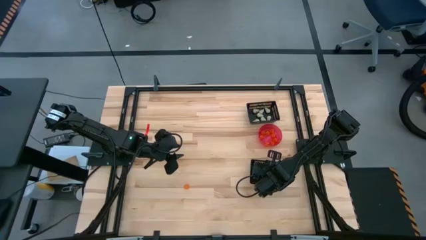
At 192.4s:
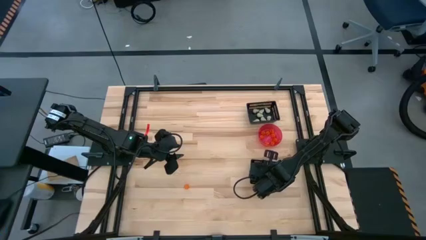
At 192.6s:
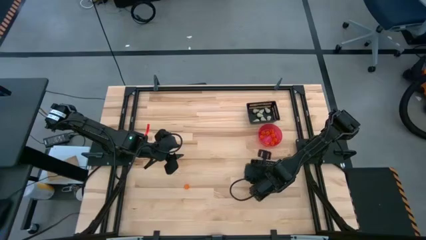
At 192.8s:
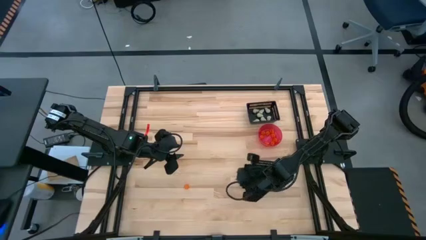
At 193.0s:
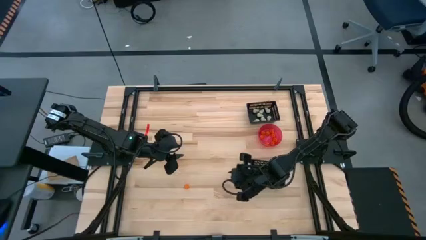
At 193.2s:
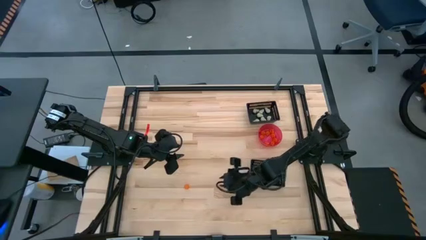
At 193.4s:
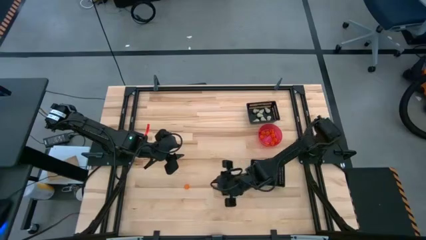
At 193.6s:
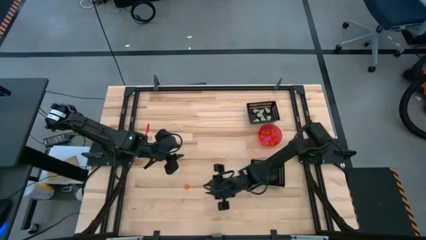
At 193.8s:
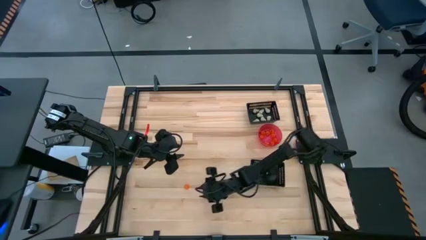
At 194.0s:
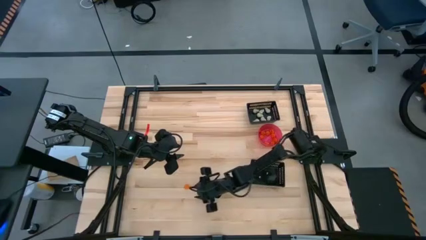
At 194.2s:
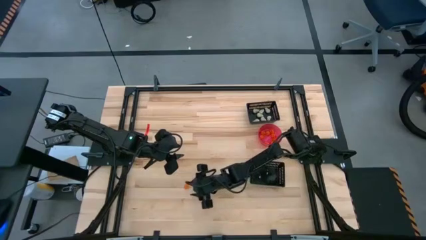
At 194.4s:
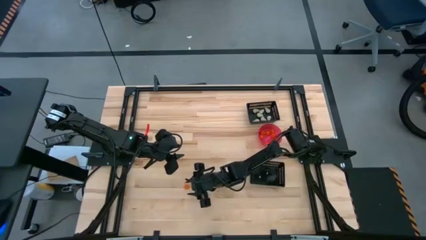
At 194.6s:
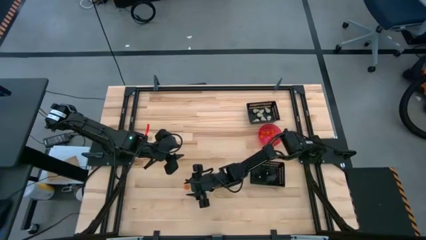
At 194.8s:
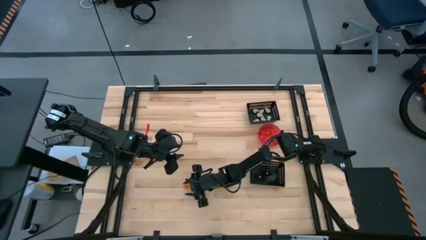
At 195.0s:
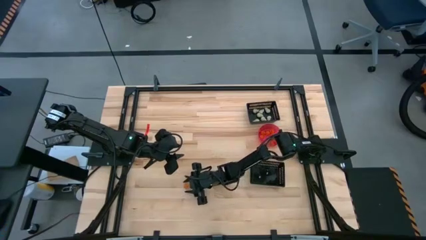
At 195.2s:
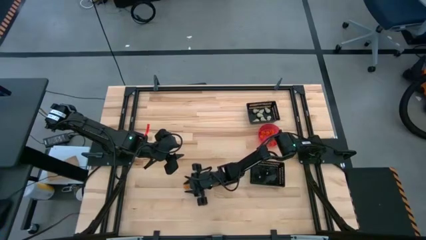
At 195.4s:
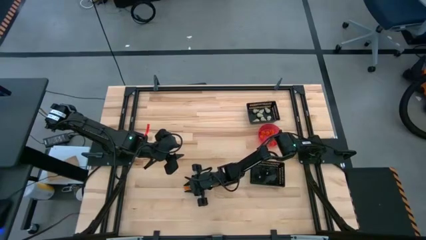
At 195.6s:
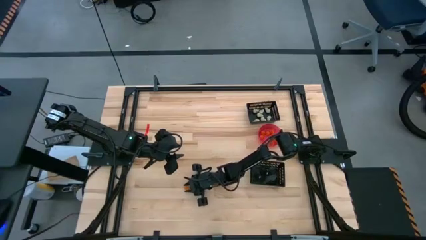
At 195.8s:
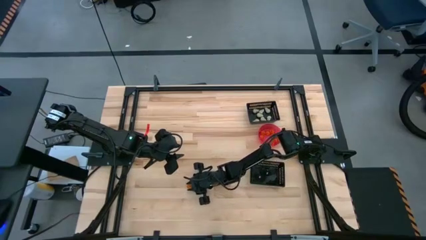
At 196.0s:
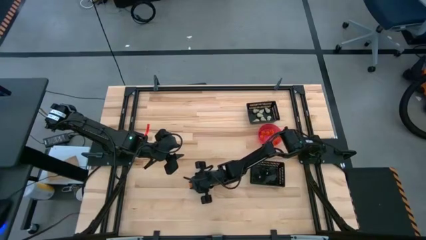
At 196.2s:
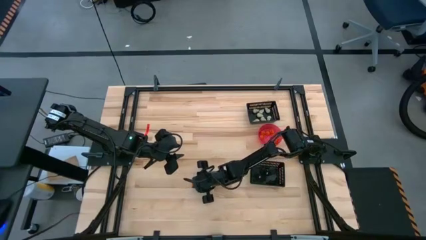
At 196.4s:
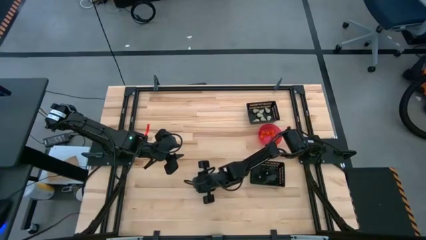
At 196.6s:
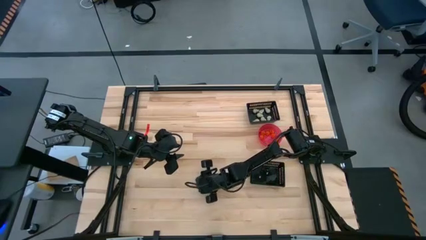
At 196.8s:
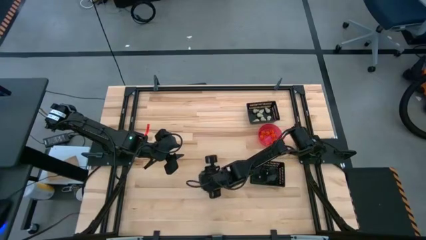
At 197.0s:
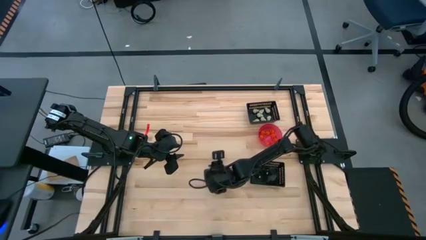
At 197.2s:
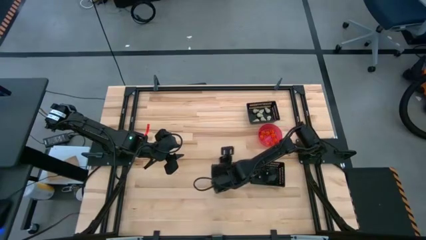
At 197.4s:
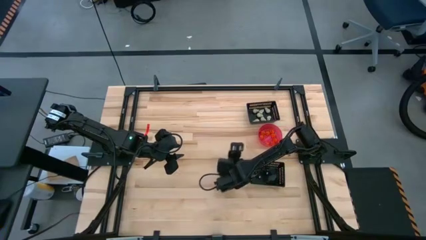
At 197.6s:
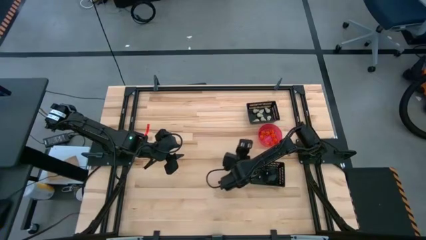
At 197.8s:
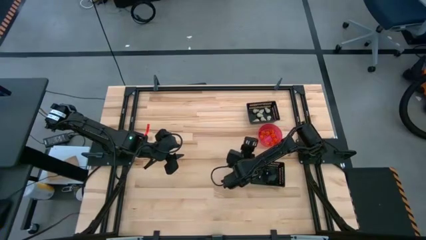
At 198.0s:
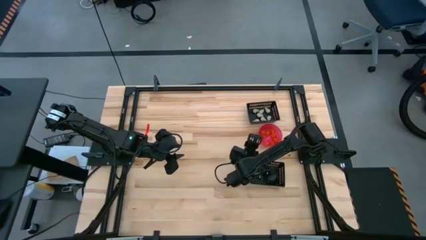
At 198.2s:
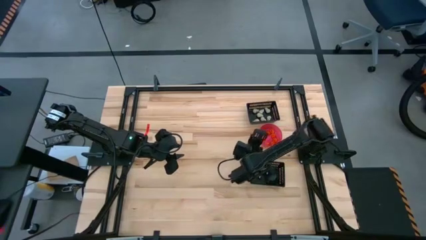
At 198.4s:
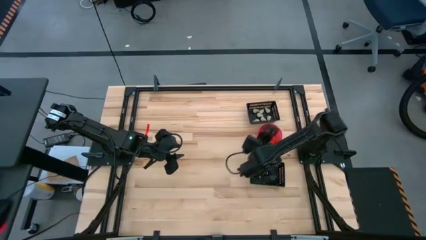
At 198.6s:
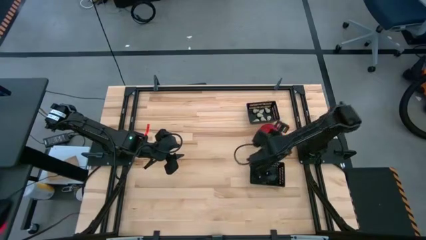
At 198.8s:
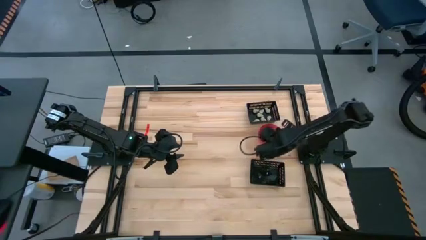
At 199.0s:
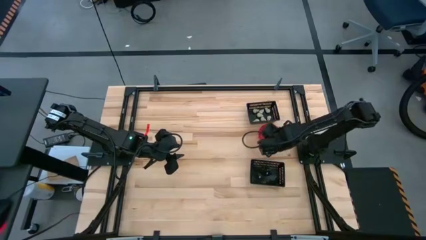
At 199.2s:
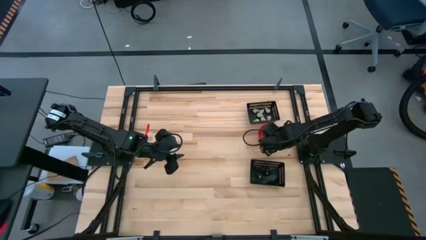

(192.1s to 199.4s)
Task: Sort Halloween decoration
Put the orange pumpkin toy into the pink bowl

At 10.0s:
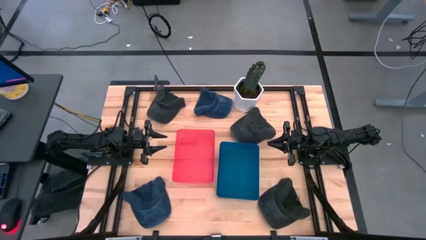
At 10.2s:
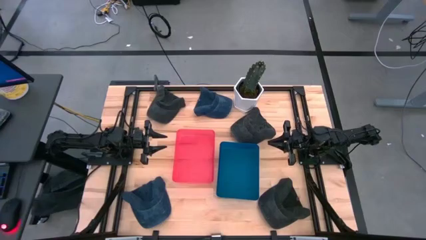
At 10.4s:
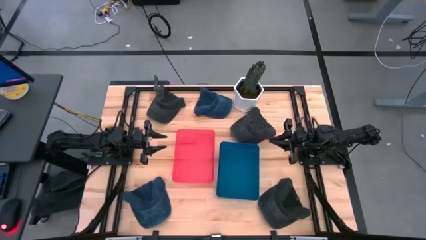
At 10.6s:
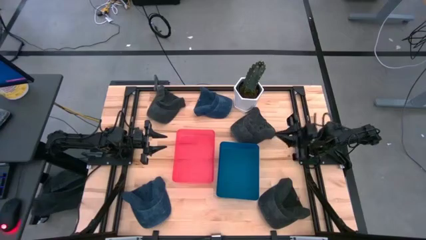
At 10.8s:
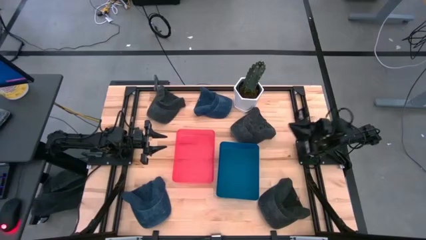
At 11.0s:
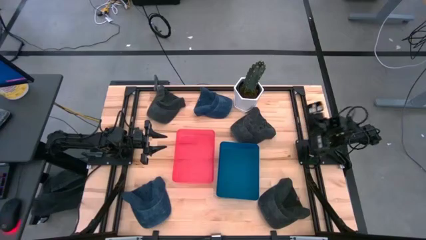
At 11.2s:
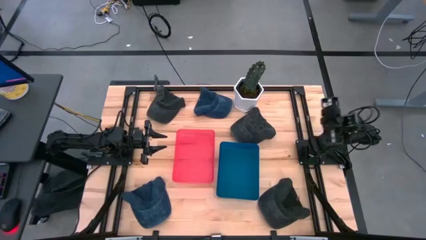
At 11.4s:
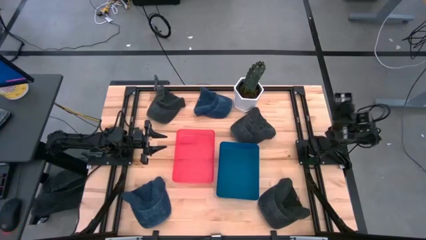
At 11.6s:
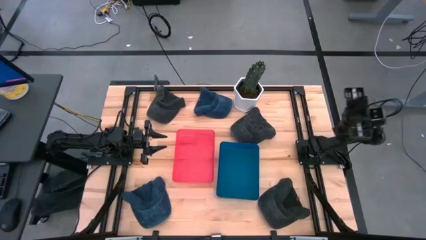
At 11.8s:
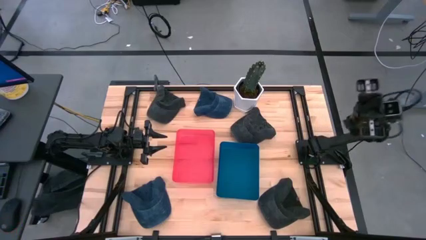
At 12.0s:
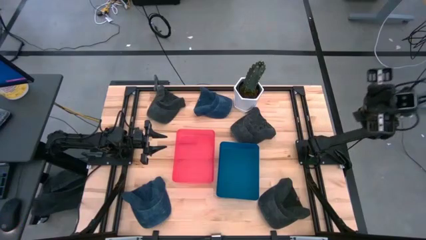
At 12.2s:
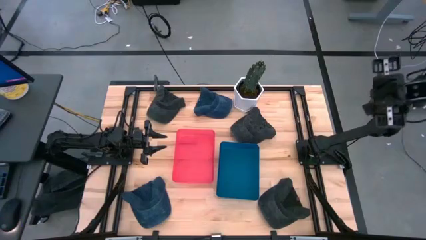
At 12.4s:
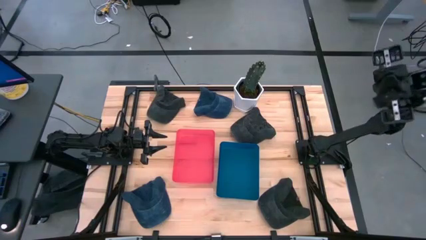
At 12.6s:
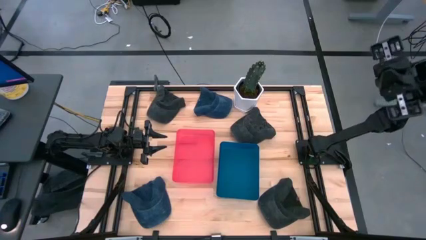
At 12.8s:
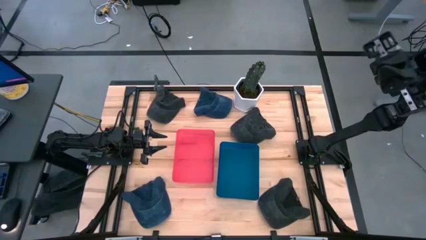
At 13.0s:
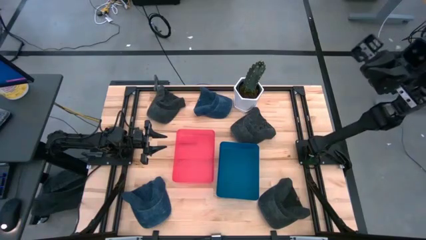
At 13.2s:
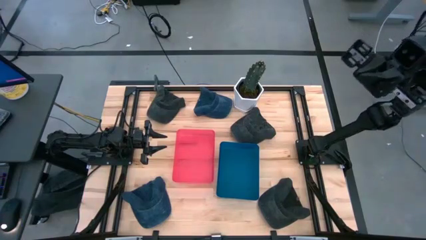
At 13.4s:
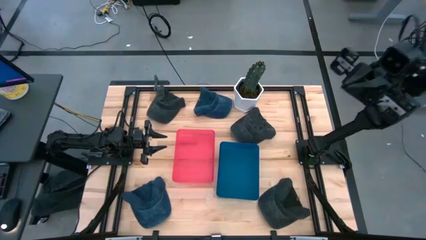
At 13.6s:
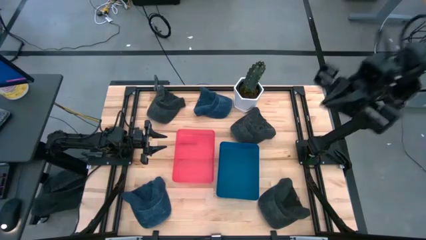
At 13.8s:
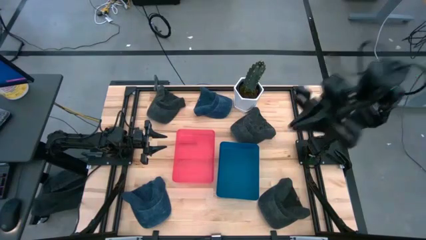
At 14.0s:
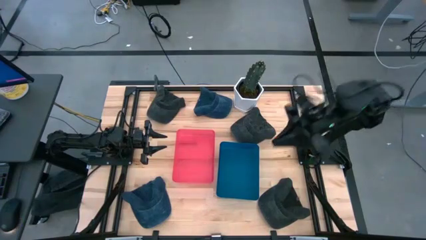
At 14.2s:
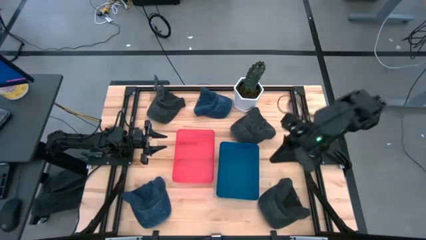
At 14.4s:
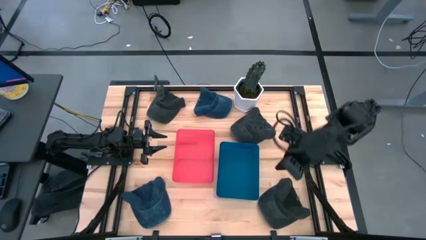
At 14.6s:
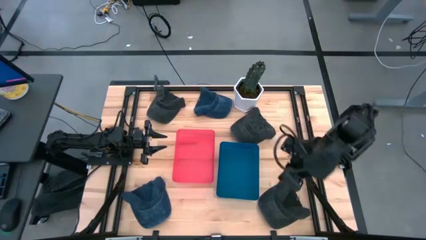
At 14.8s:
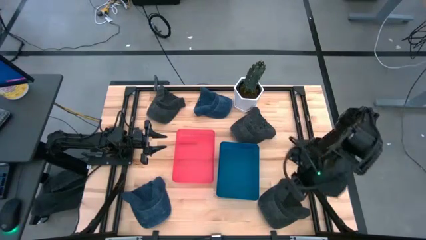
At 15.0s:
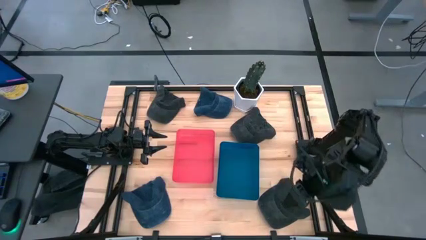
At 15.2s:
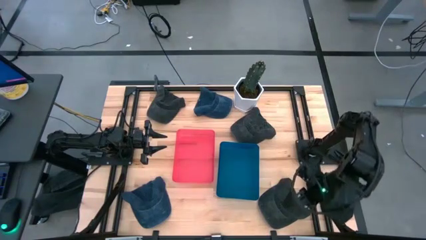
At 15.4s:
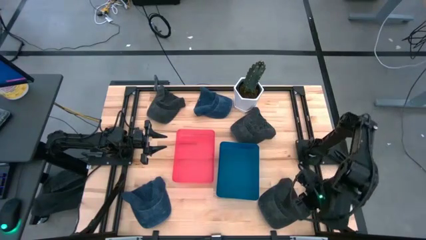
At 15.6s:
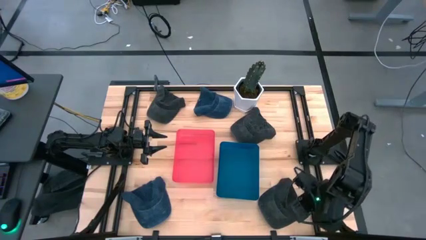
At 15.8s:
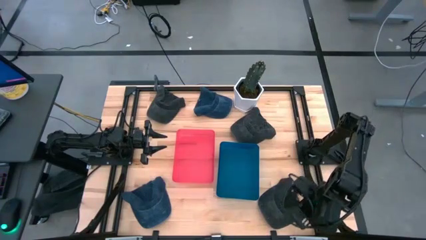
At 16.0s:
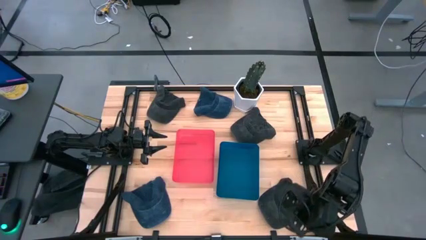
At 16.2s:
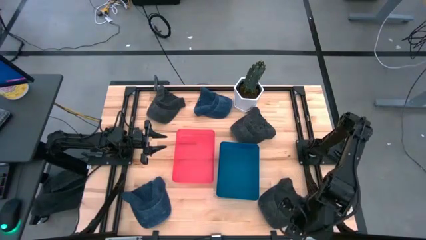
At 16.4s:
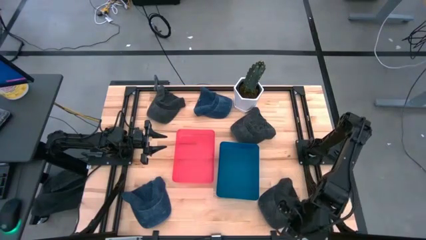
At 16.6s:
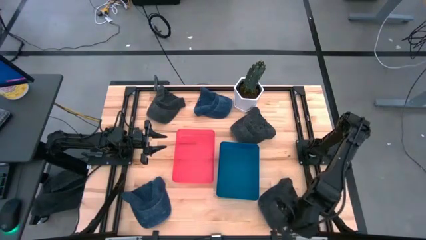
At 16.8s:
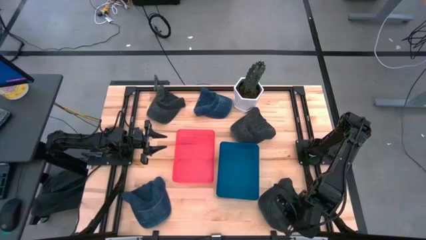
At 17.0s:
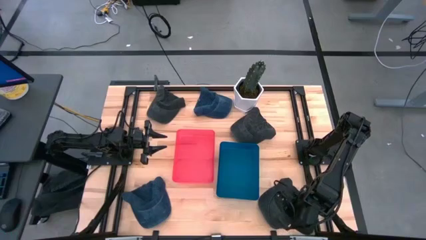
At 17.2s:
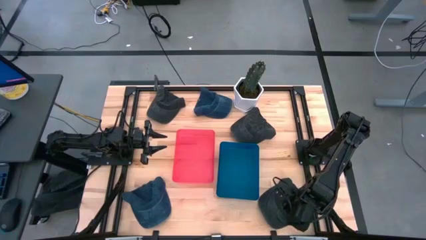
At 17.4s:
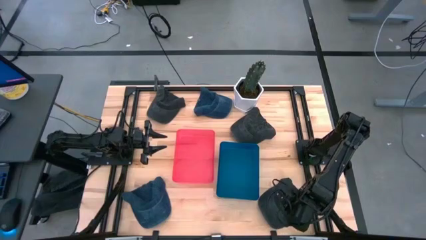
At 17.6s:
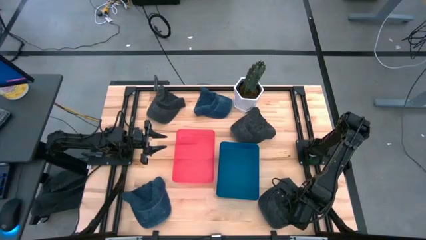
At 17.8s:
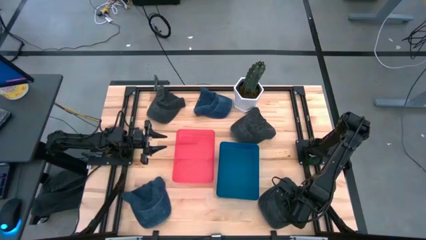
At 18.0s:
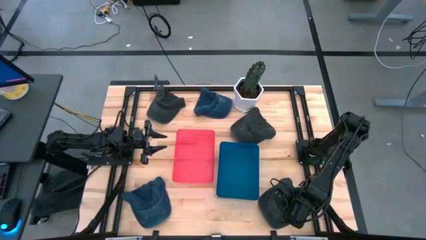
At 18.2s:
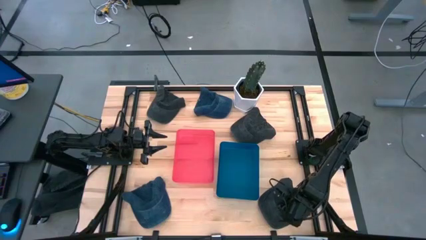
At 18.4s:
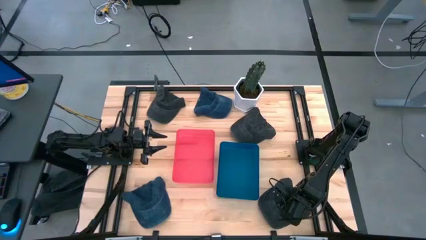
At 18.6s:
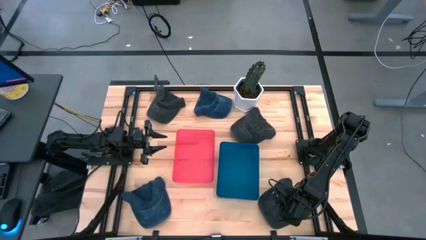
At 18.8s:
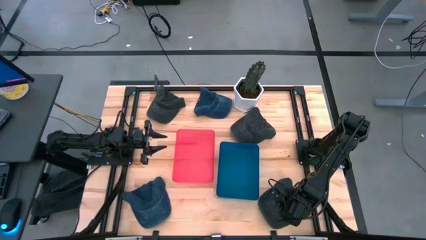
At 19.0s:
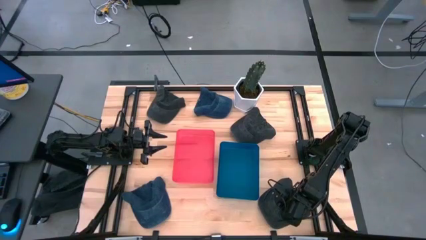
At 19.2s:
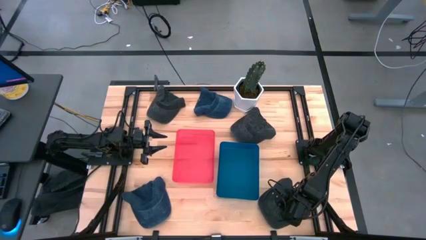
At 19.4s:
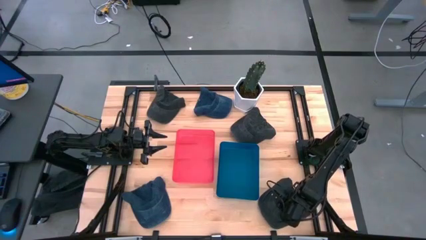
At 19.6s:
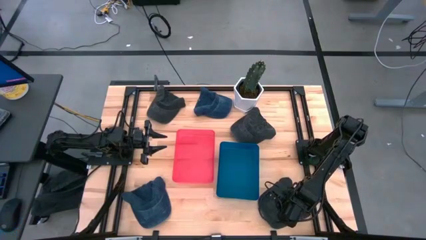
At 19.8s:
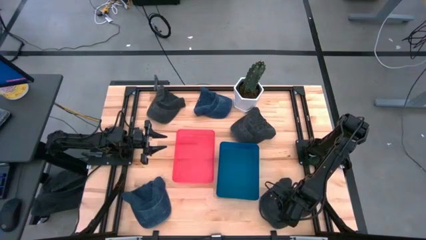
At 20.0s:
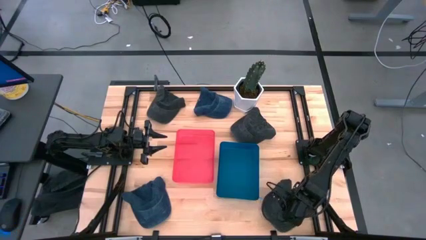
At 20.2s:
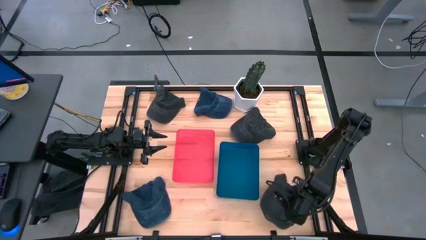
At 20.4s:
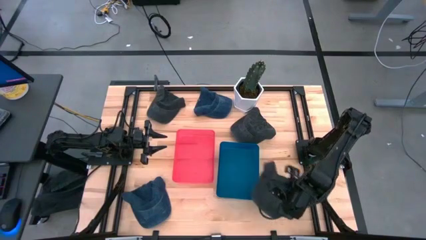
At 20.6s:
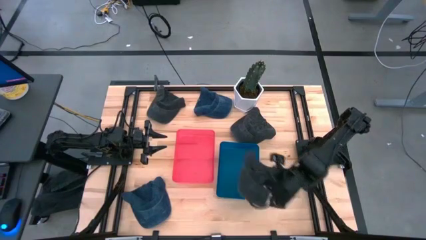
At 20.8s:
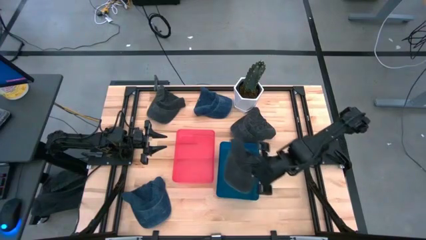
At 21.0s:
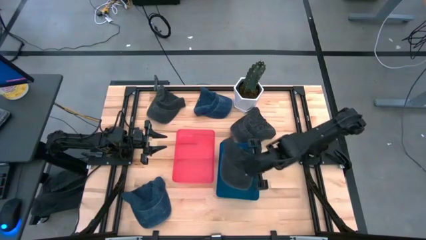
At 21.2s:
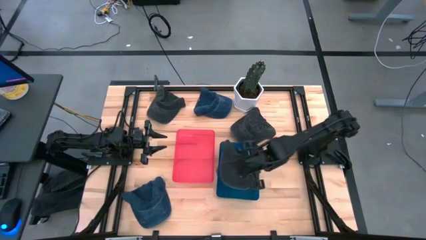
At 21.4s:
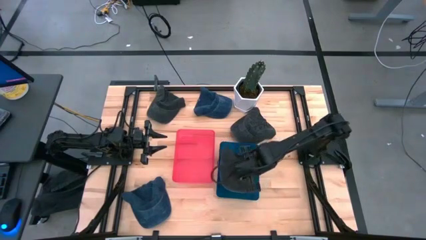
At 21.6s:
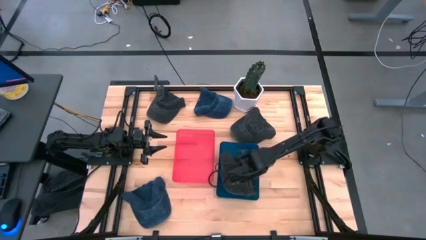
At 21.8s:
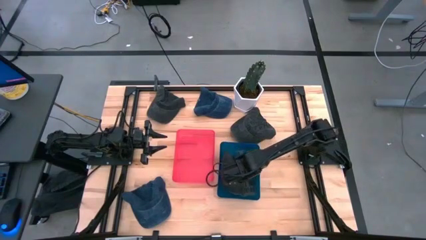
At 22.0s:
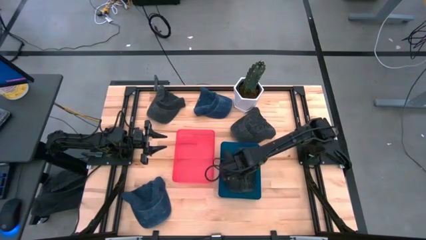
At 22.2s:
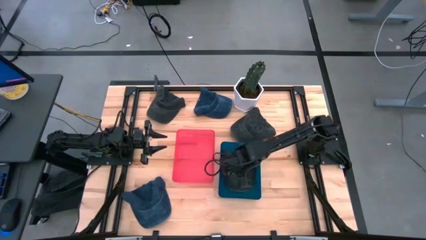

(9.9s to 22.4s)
Task: Pick & Place hat
Put the bottom black cap into the blue bin
